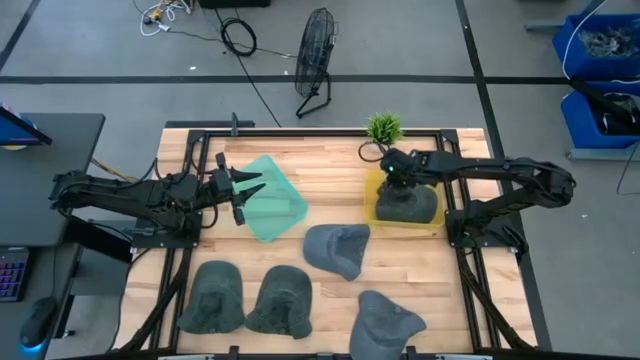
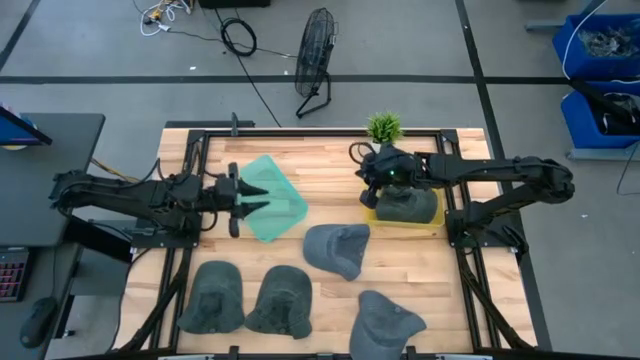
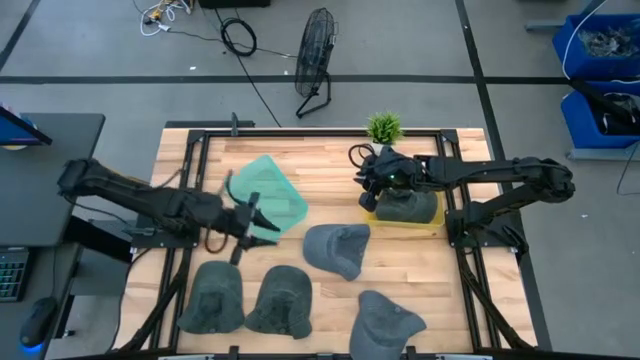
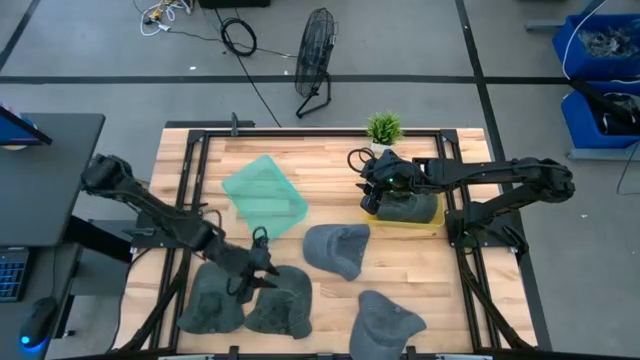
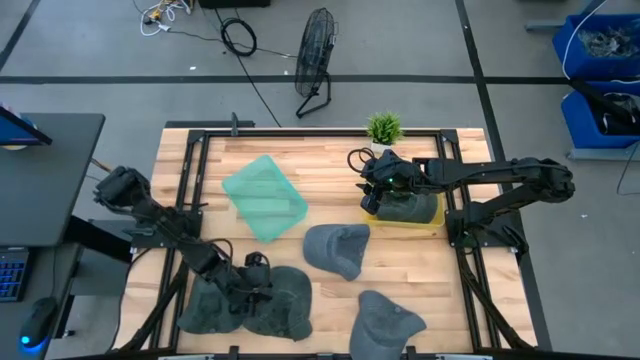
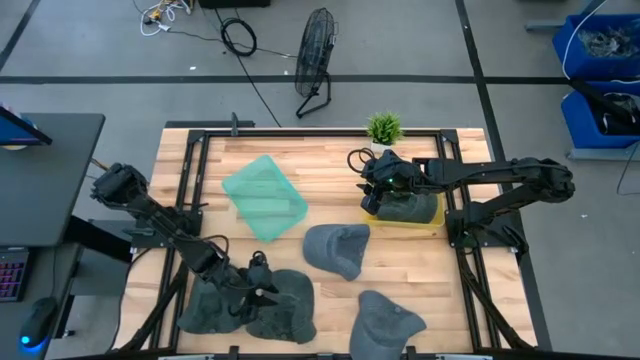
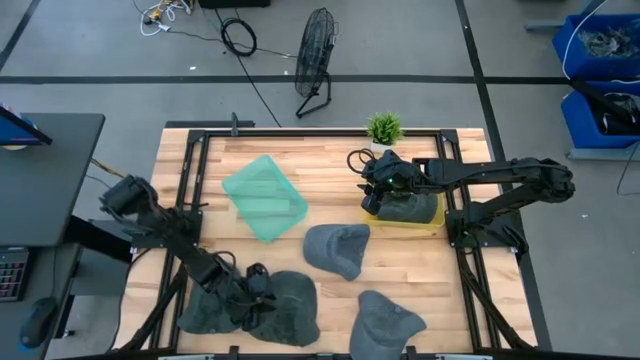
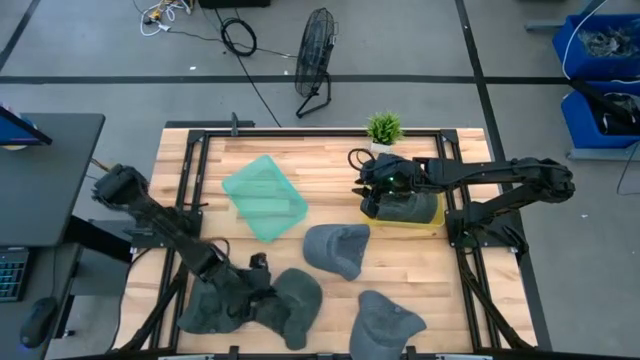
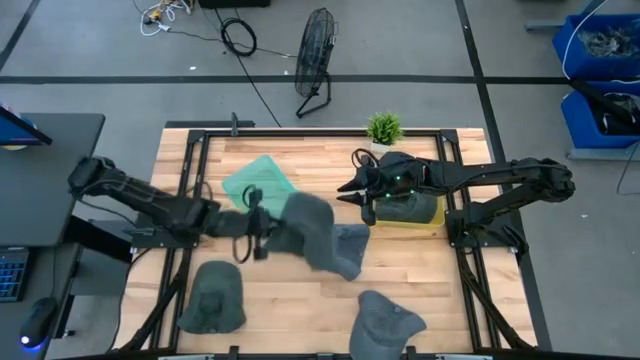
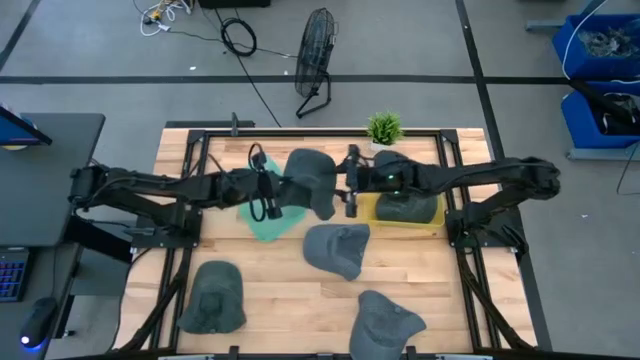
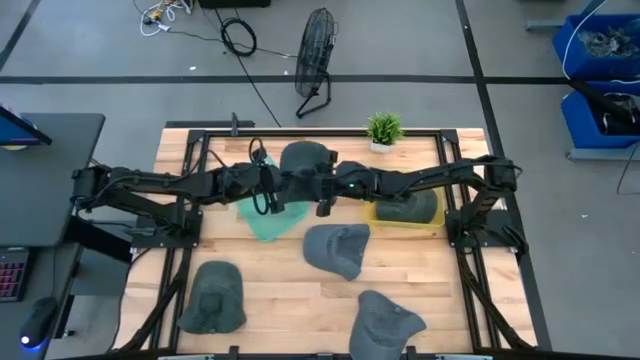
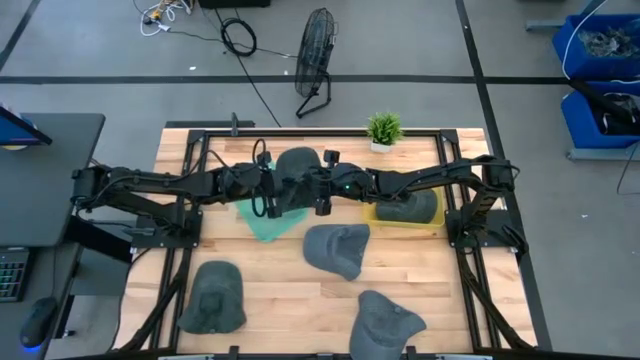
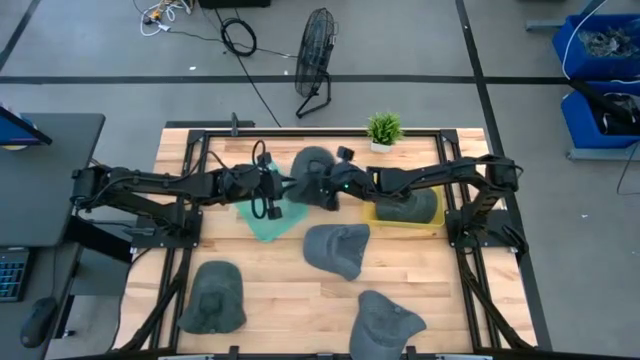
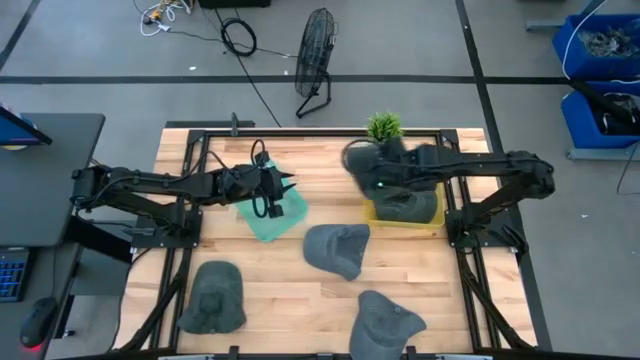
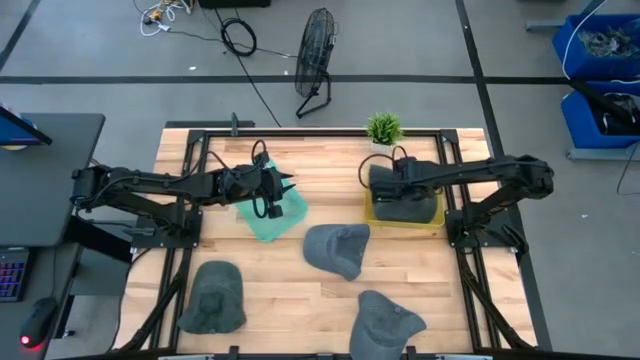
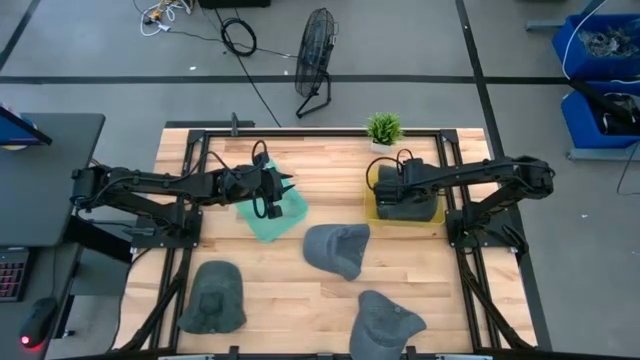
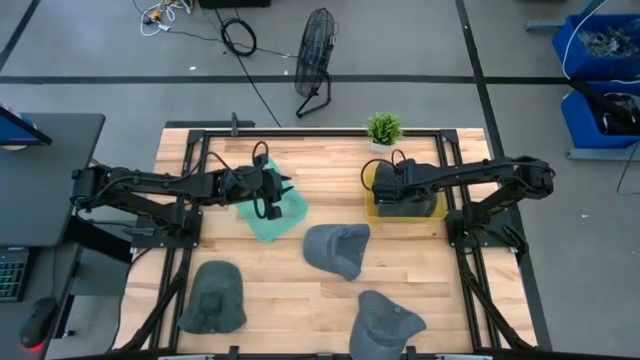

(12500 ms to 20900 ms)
Task: Pick & Place hat
Put the right black cap into the yellow bin

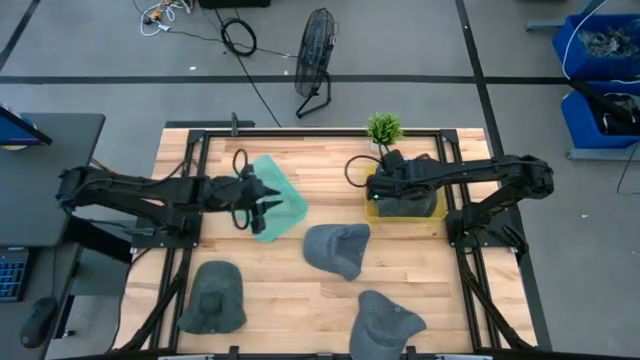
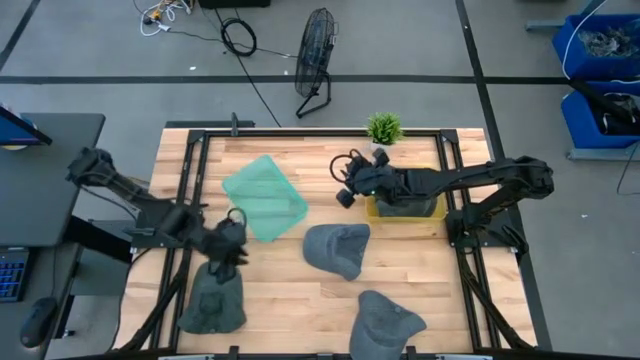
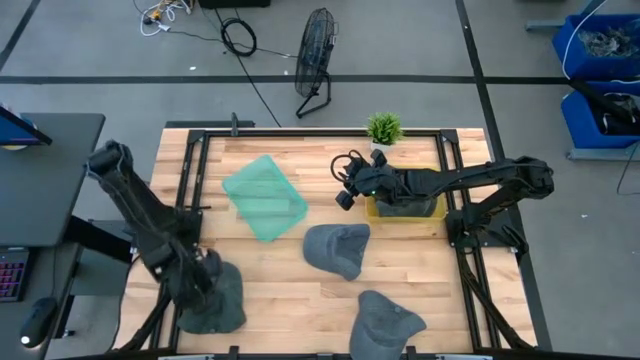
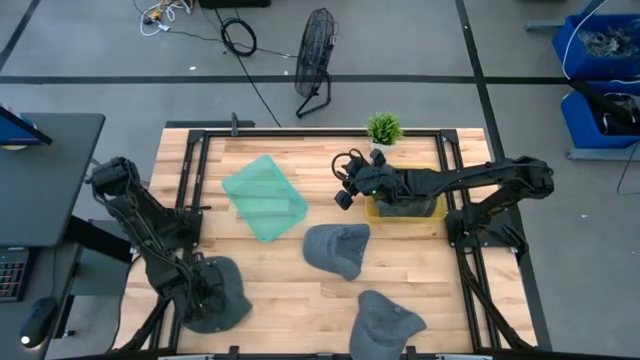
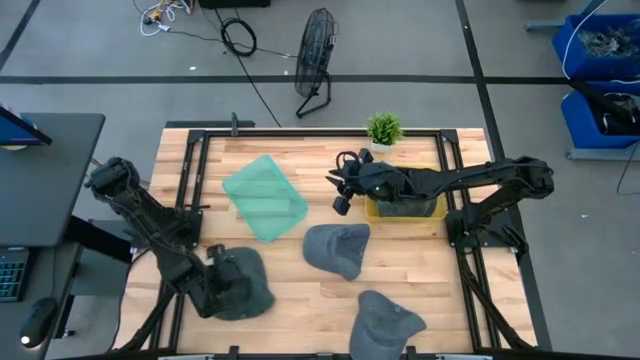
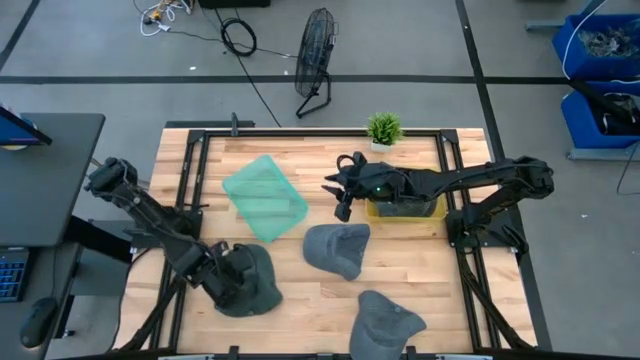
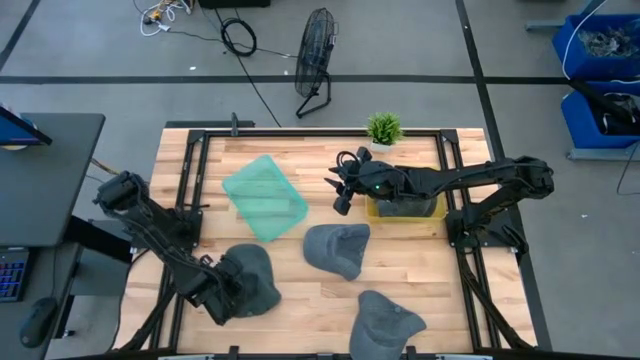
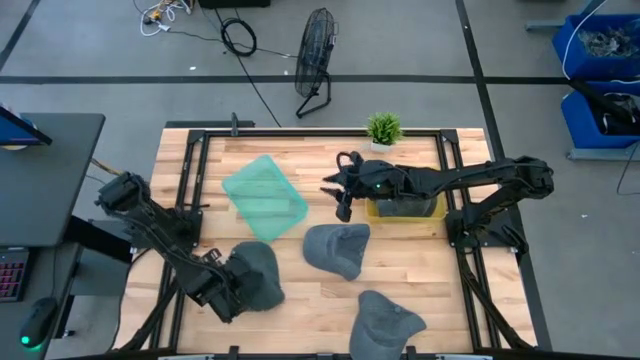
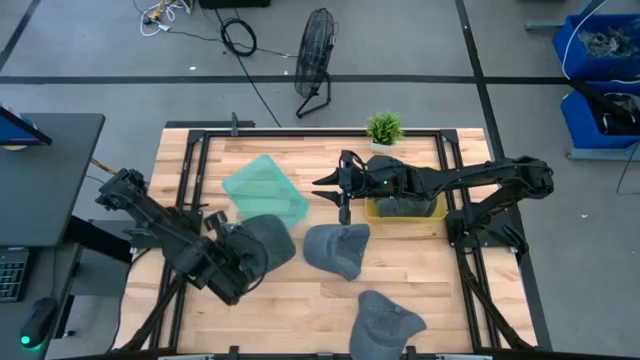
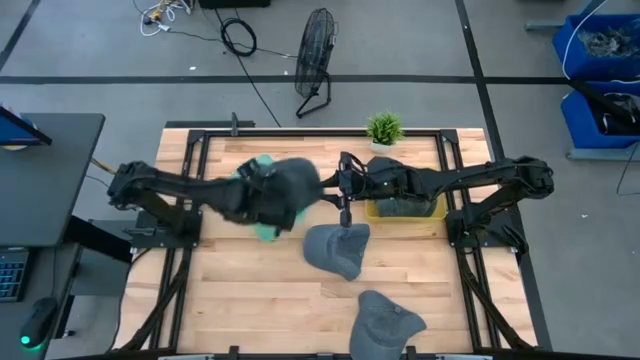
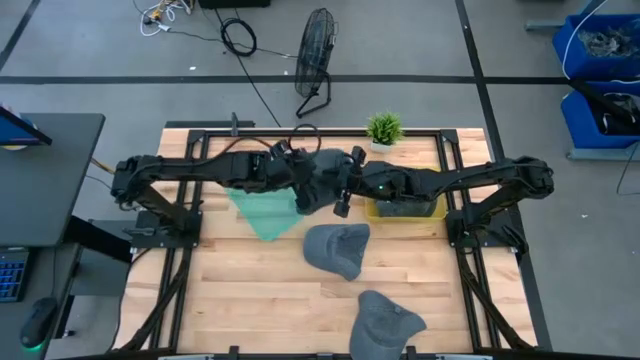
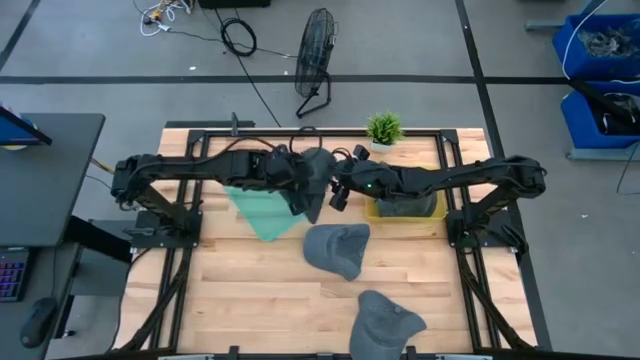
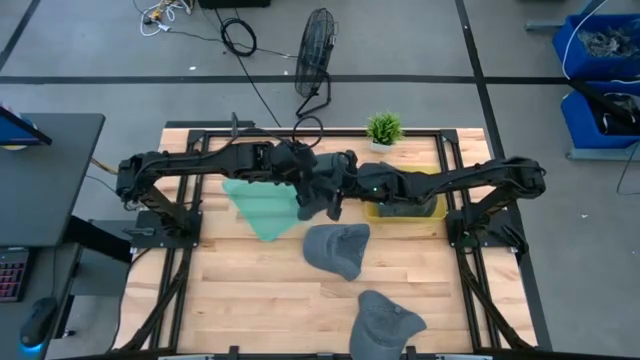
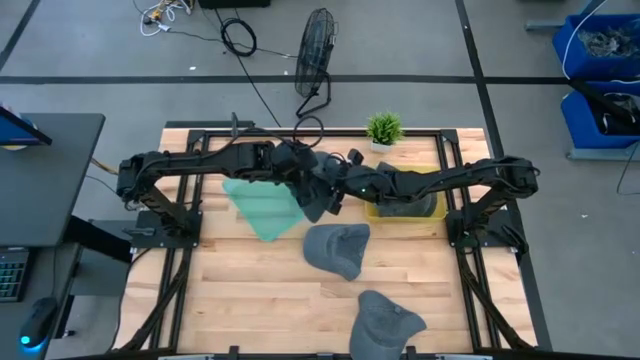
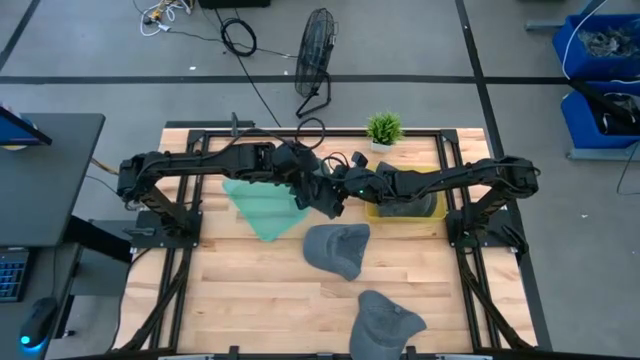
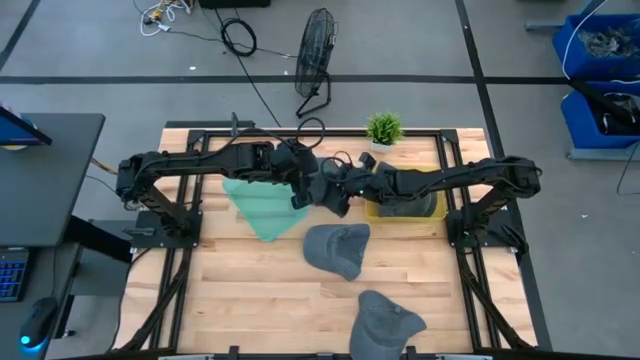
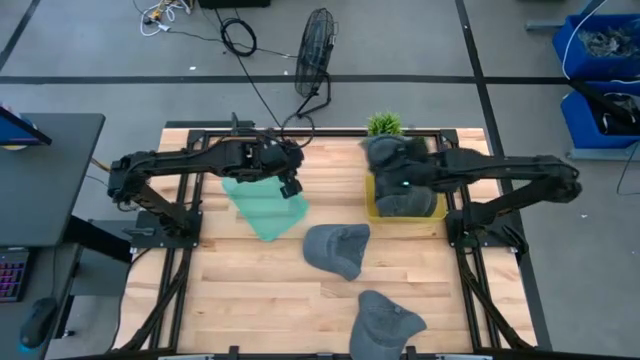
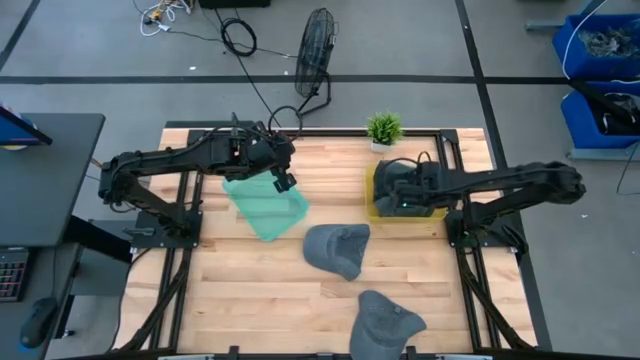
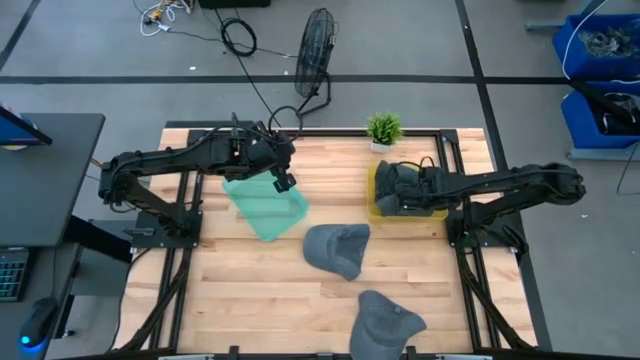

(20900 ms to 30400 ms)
Put the black cap into the yellow bin

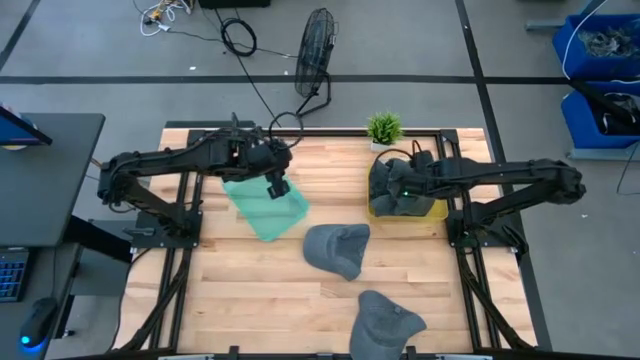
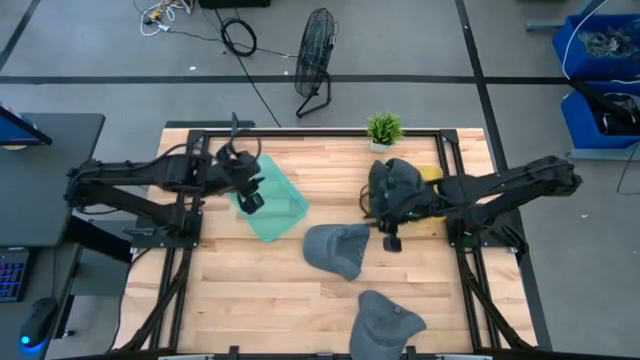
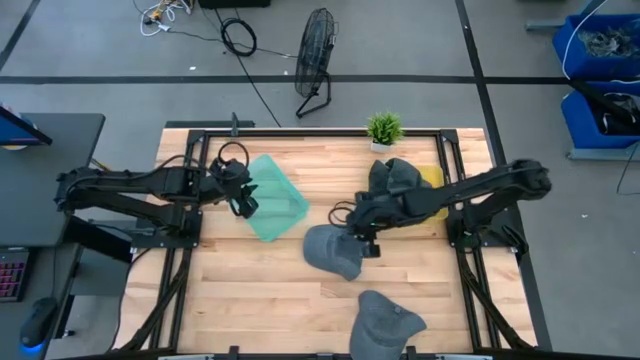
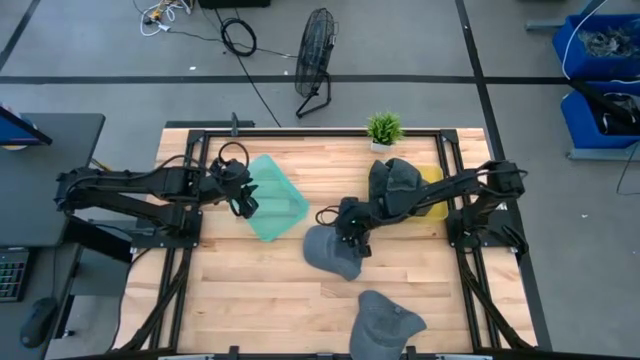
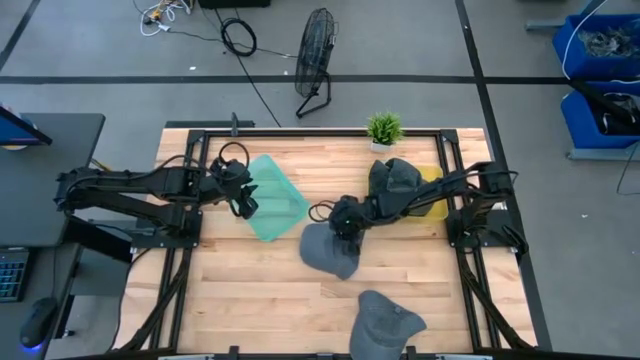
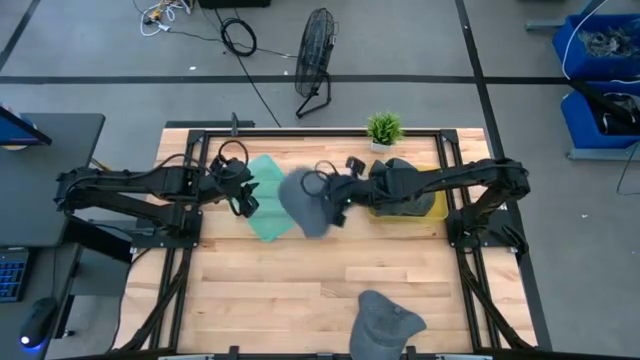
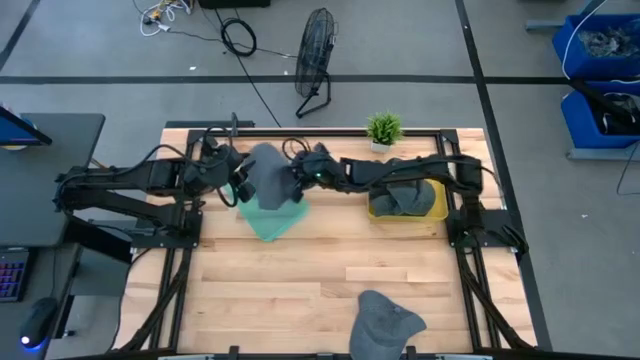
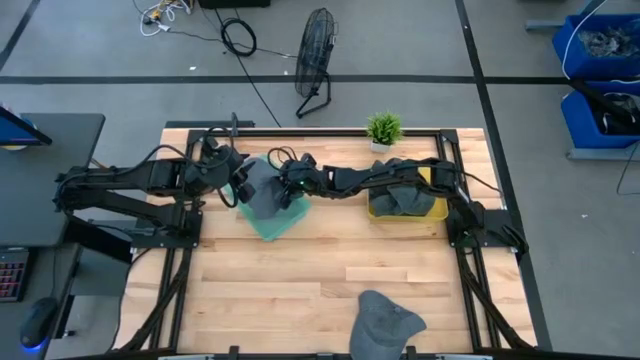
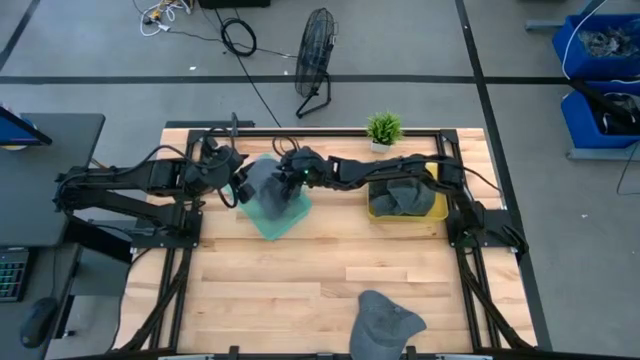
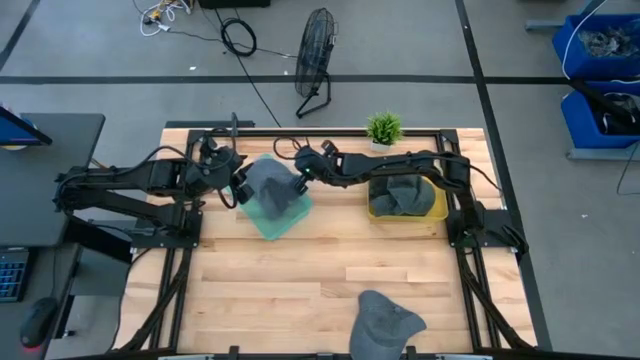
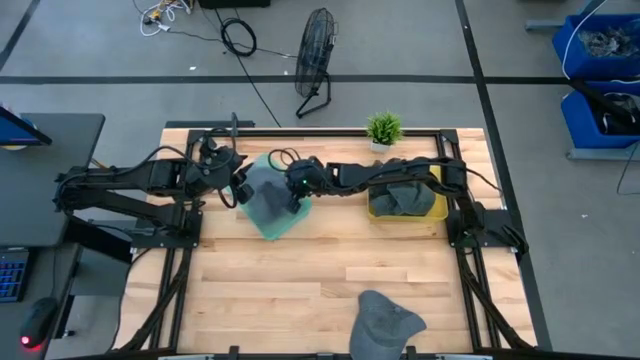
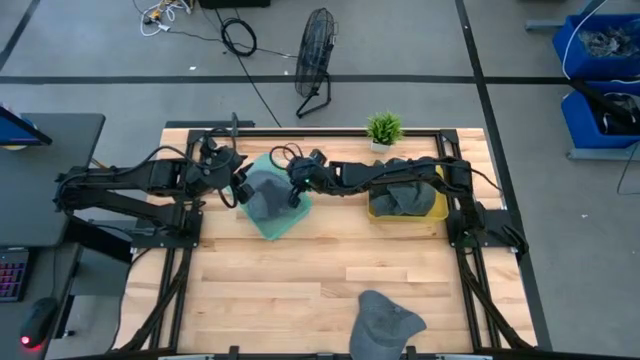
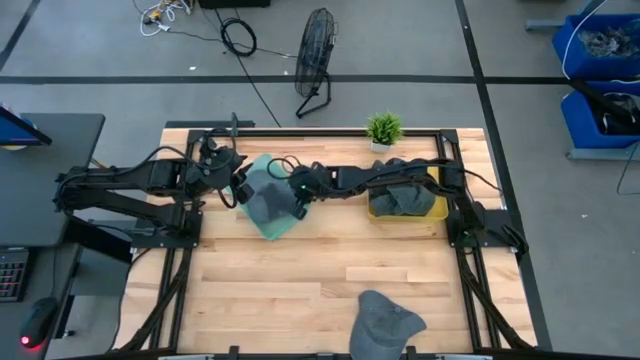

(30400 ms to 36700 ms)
Put the top blue cap into the green bin
